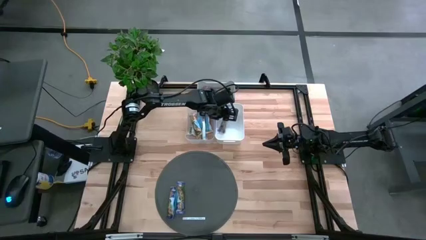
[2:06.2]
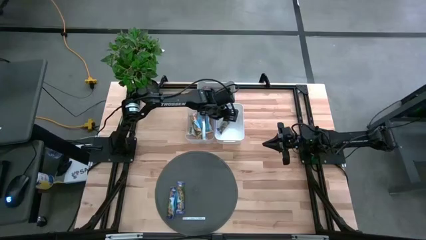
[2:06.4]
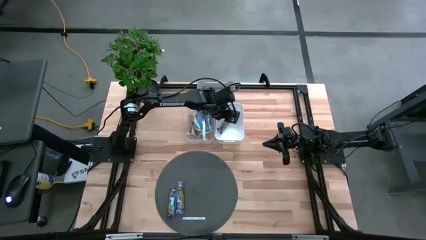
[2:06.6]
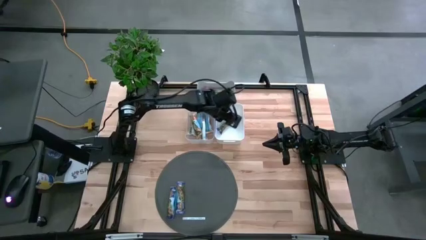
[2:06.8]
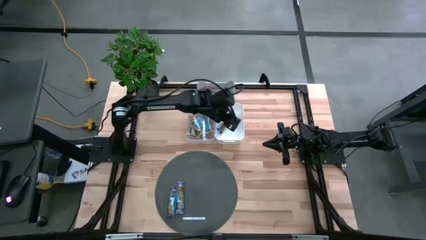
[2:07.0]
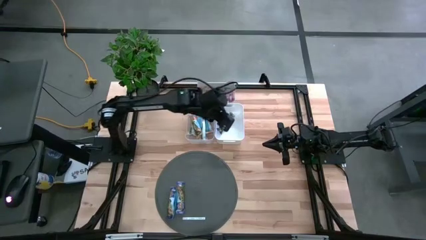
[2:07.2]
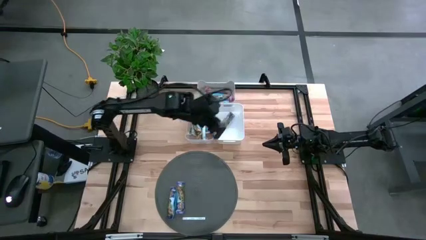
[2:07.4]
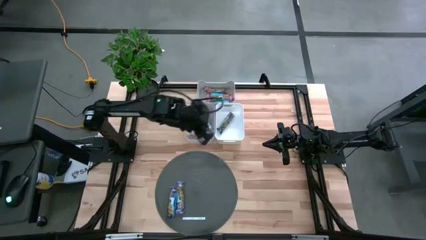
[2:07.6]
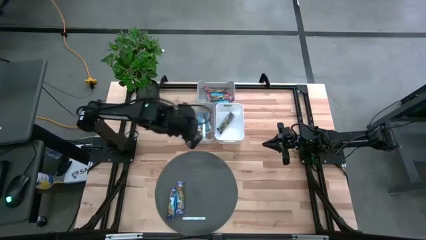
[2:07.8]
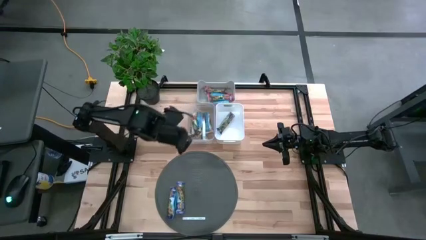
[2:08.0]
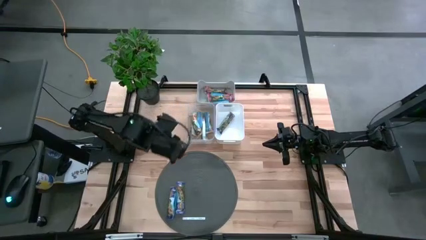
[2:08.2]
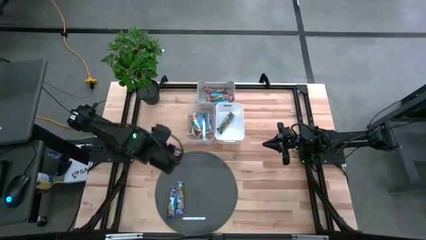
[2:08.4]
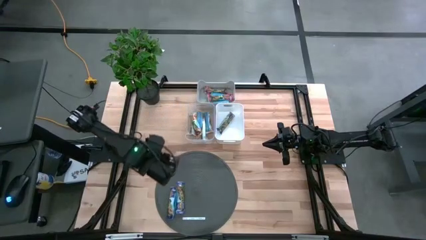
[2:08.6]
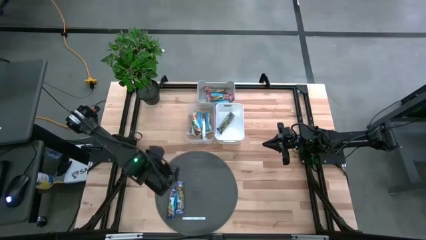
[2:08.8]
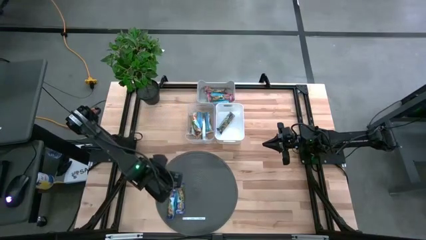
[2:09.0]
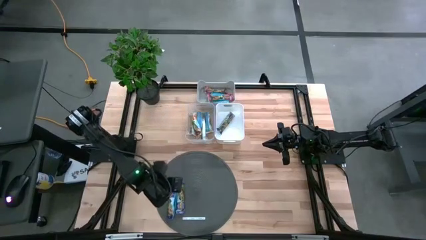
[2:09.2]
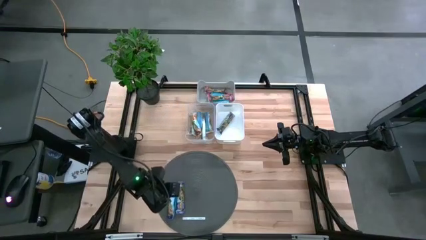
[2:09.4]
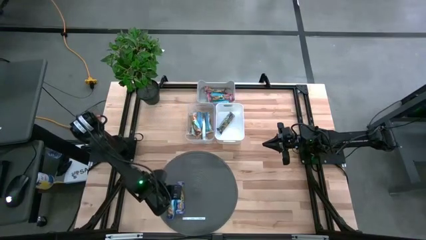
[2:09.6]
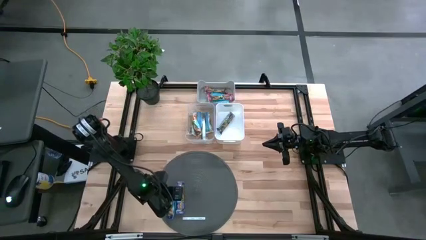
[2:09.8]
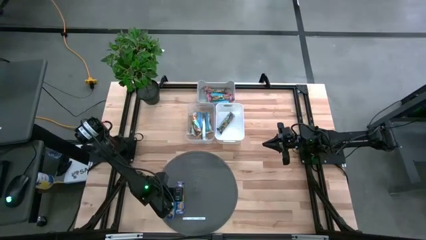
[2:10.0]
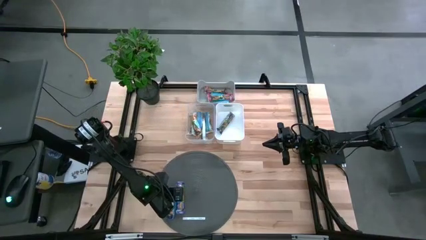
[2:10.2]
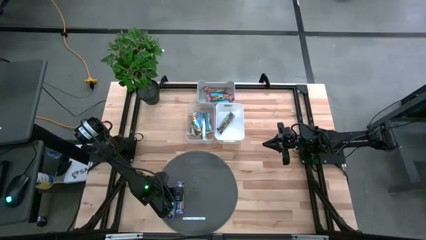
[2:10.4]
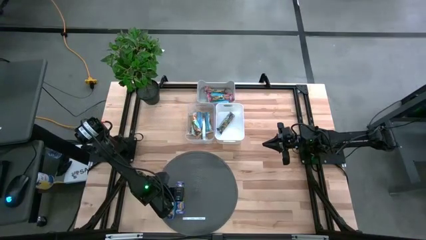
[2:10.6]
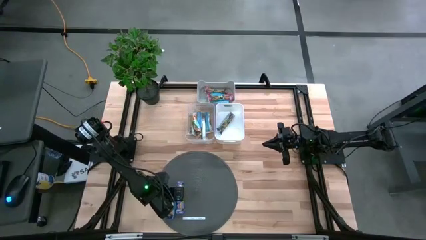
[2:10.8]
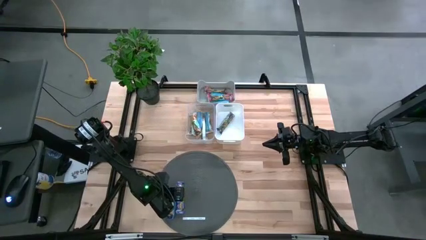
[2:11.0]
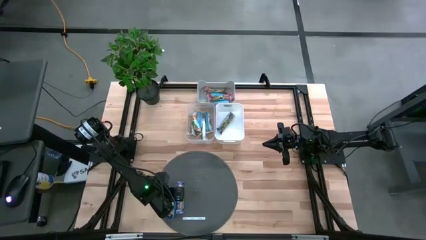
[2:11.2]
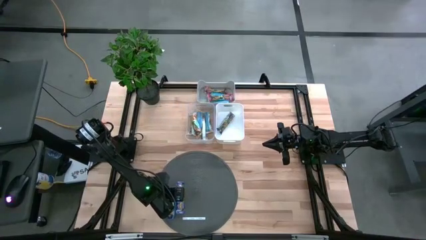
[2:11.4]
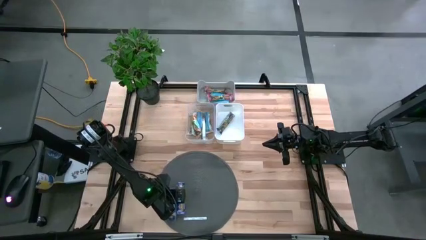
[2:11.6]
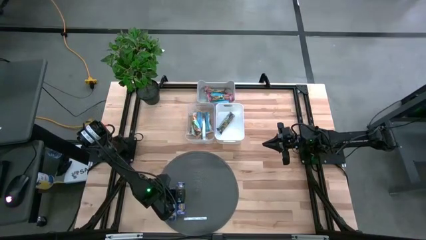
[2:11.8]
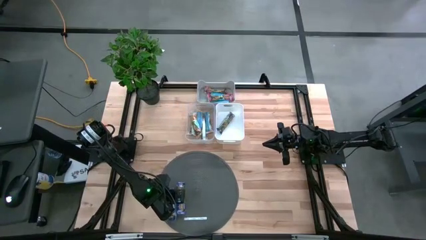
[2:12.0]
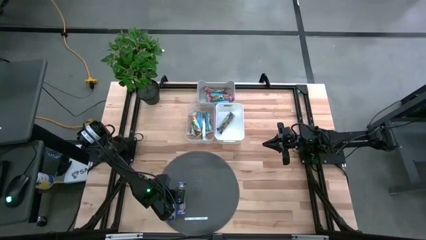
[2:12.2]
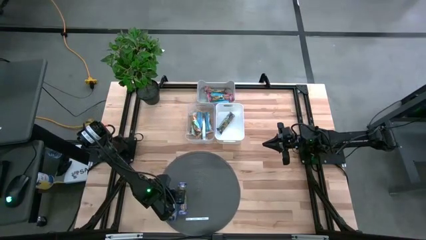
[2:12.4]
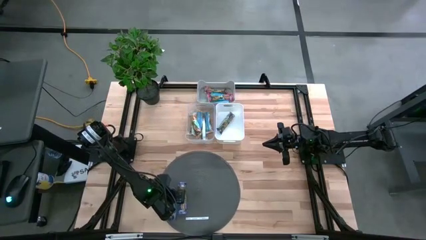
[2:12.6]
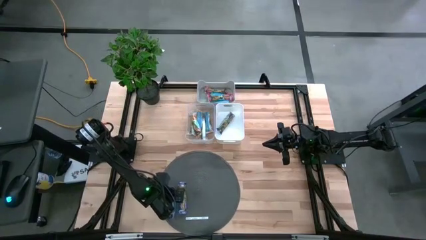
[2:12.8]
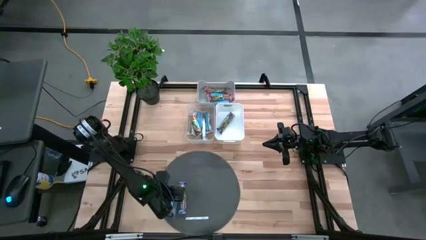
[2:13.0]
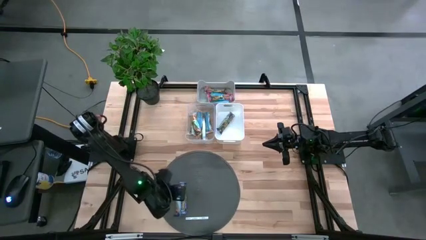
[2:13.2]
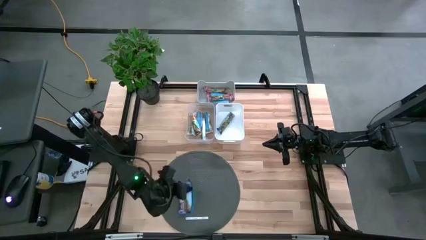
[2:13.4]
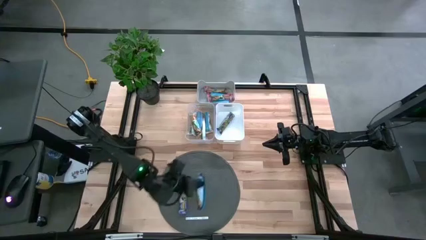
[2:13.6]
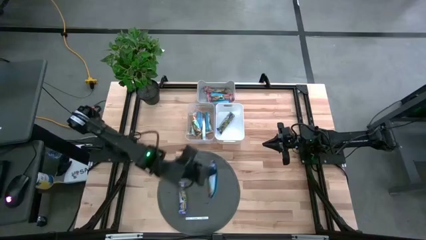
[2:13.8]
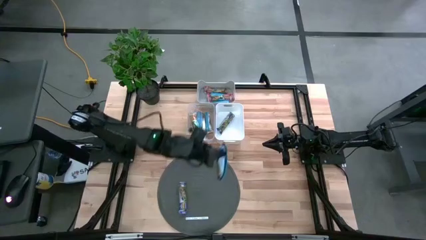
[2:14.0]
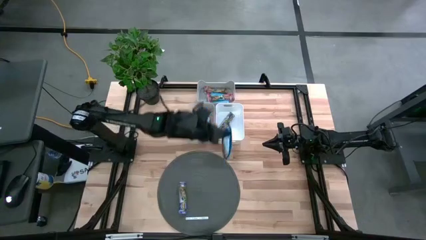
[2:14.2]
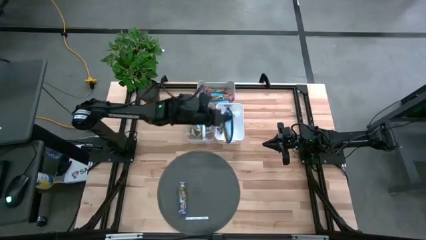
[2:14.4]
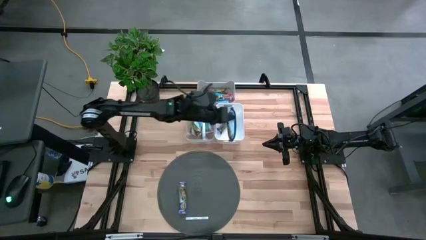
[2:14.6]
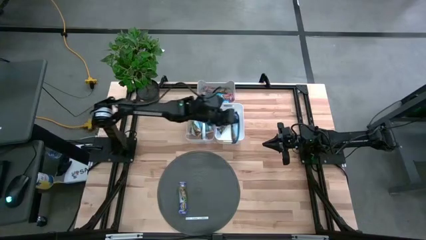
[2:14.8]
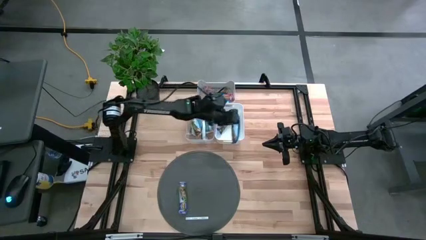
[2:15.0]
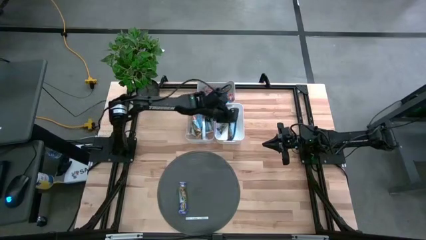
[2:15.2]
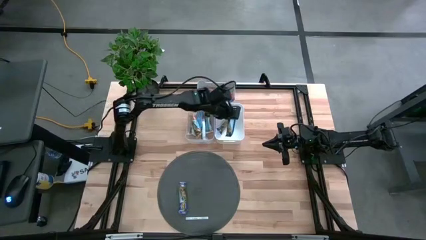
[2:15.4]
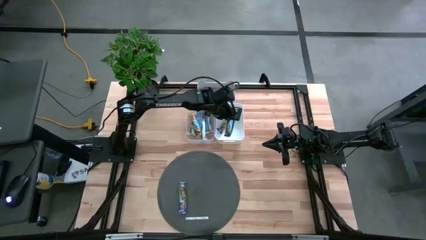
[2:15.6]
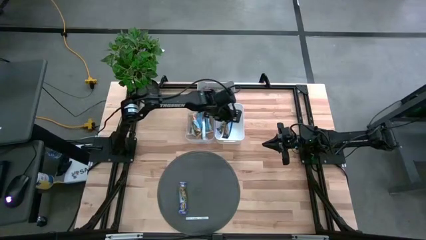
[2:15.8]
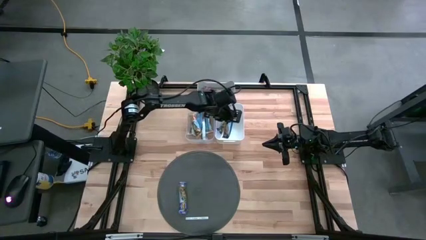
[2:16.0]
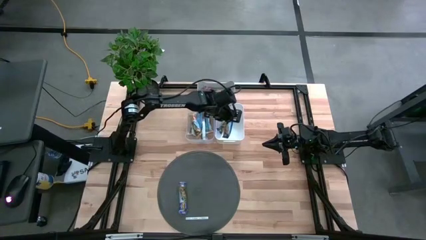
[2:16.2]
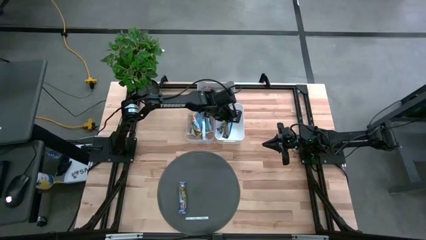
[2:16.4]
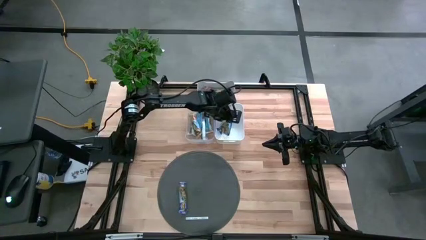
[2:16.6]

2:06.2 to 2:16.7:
Task: Pick and place Granola Bars by type
Put the blue granola bar into the white bin

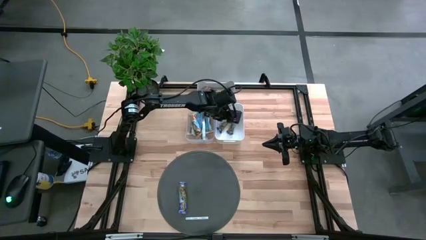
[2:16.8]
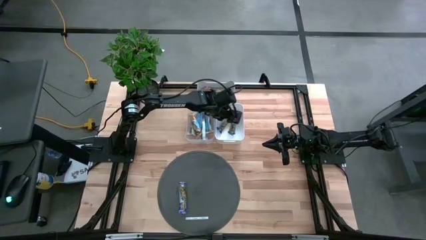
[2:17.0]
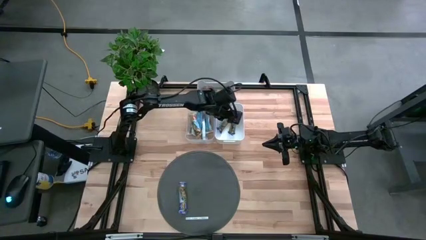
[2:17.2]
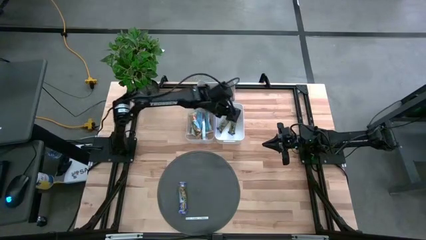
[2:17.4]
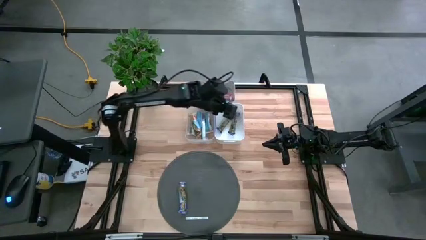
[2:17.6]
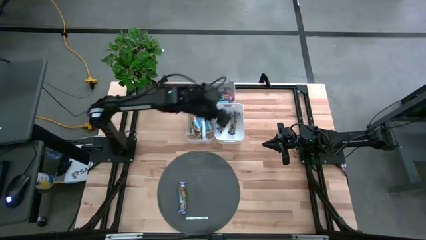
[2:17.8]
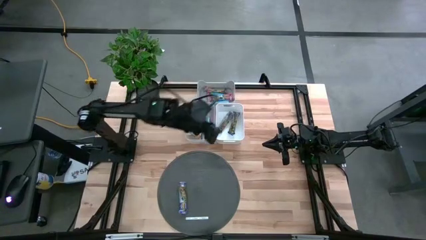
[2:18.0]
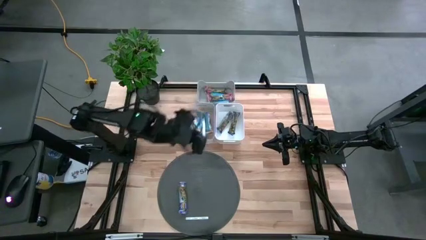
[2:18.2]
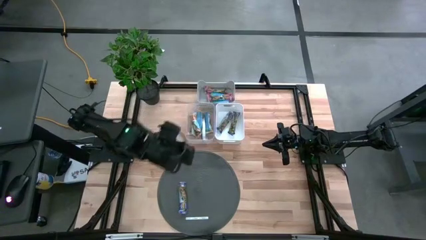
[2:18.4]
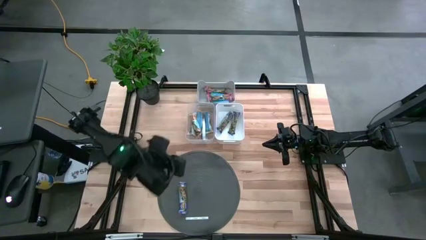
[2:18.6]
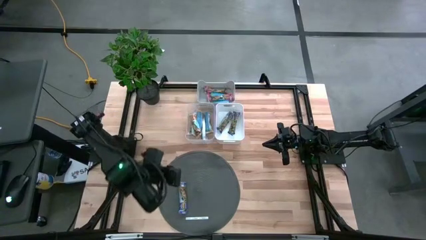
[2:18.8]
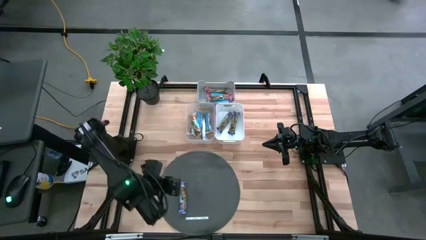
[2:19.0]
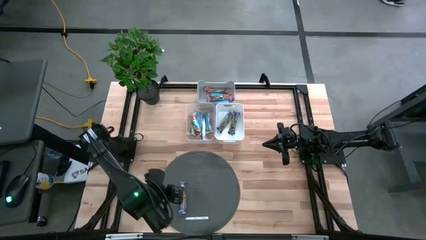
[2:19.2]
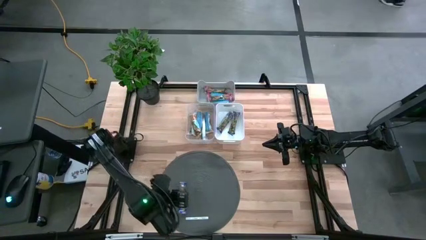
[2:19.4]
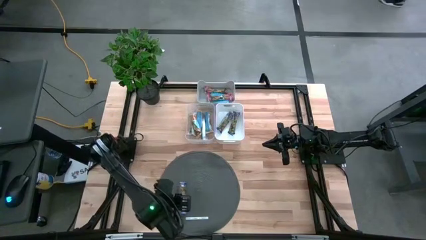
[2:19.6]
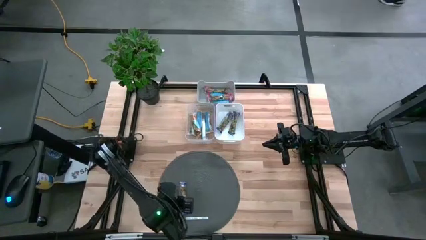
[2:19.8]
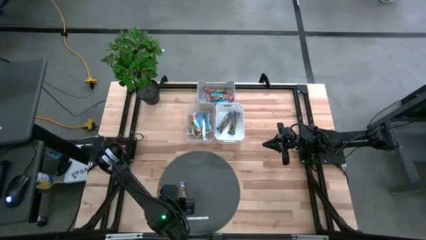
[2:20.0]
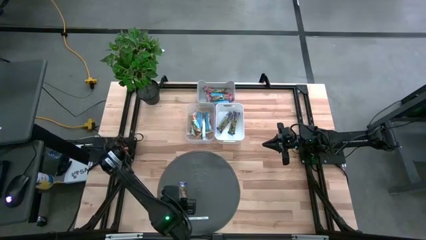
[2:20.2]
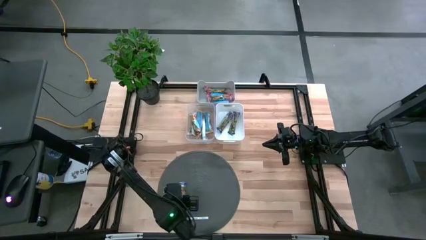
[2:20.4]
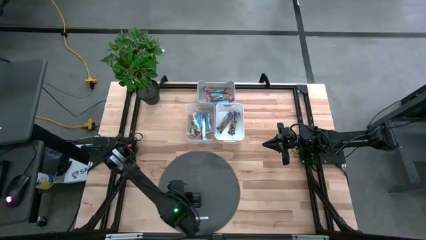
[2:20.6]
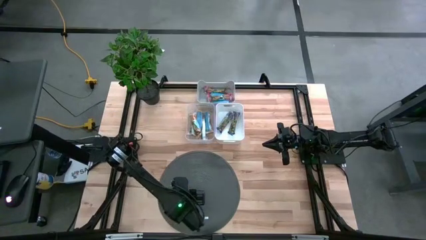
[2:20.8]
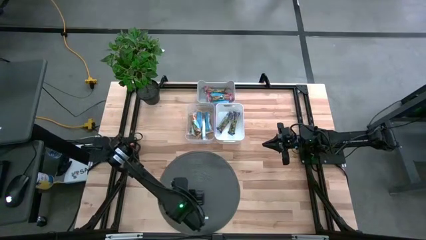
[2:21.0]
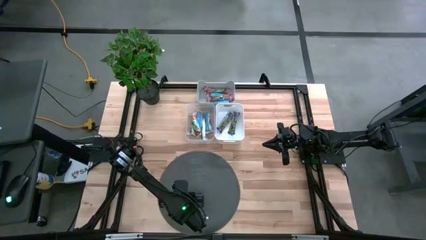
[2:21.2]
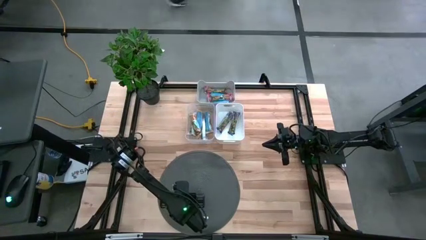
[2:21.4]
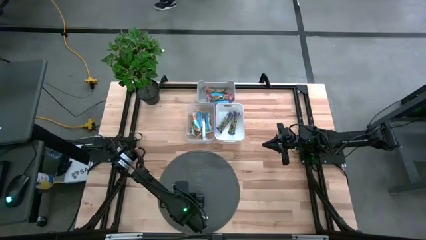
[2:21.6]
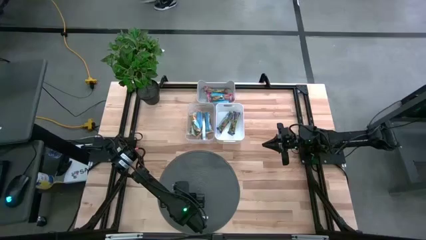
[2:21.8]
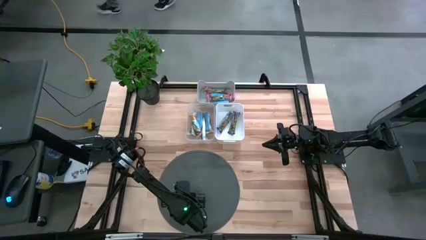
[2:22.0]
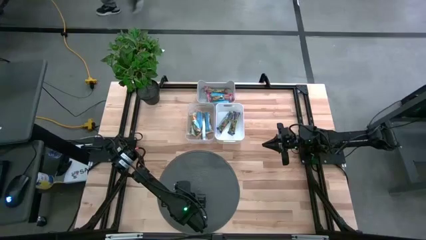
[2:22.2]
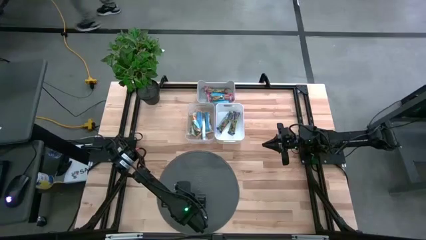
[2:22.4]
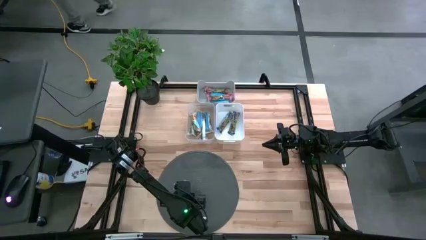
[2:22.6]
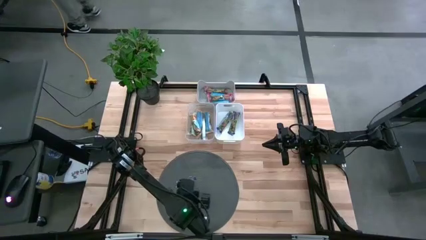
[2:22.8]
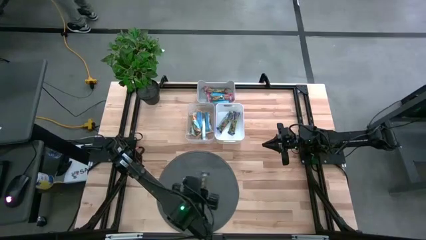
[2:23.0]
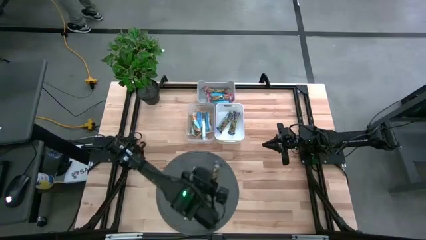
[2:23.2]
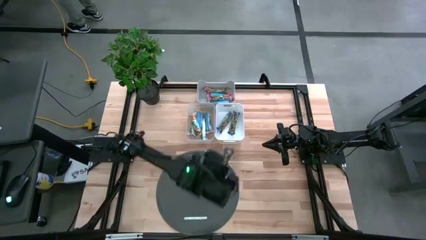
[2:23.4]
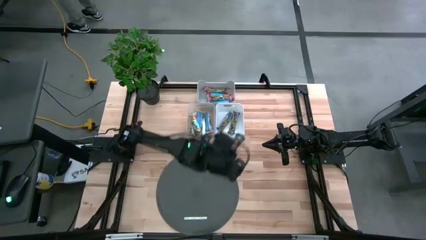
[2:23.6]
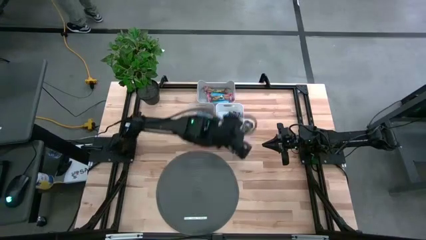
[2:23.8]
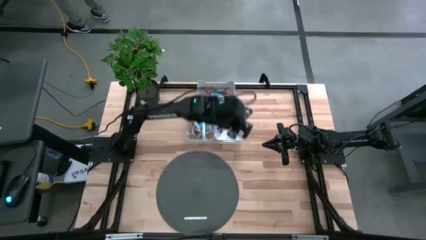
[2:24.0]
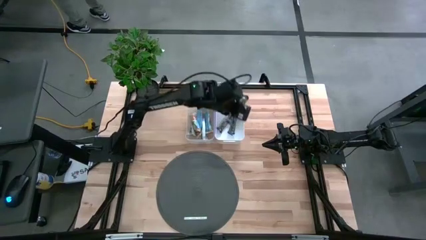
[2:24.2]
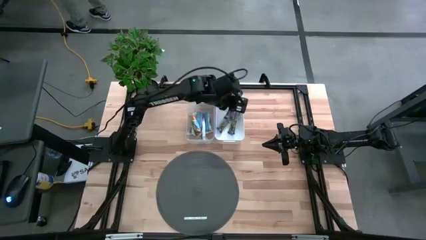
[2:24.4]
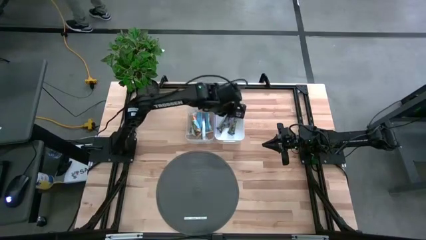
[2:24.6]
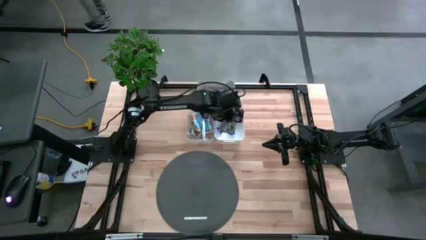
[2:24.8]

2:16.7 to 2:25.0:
Put the blue granola bar into the white bin
